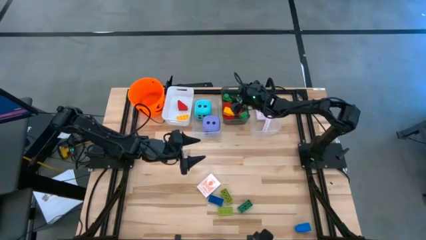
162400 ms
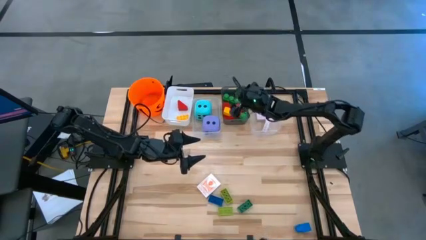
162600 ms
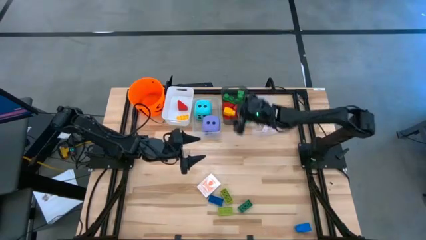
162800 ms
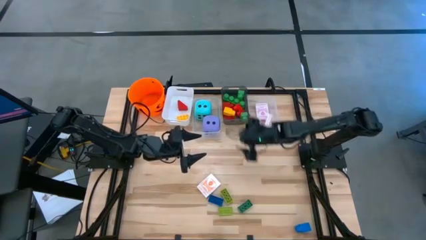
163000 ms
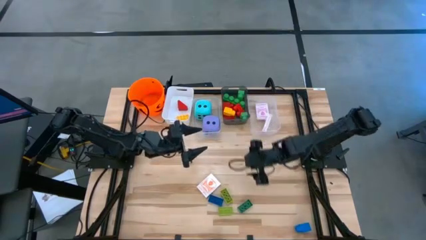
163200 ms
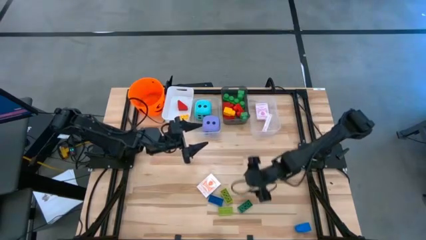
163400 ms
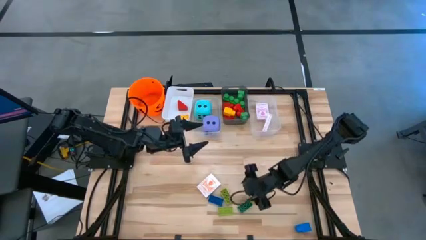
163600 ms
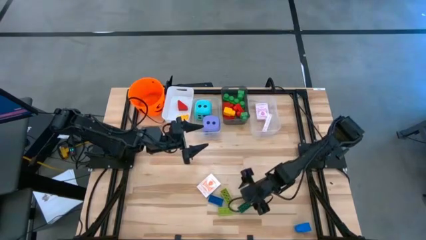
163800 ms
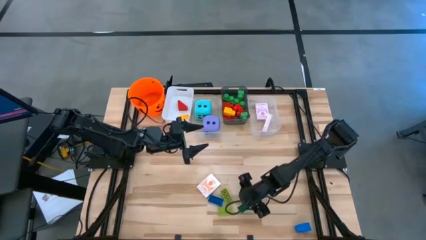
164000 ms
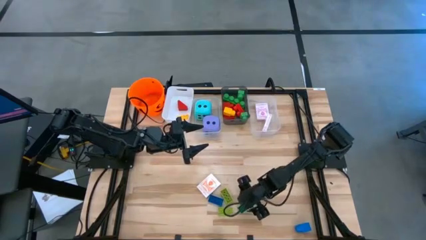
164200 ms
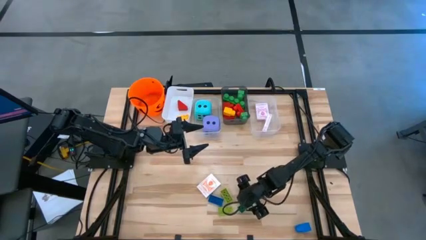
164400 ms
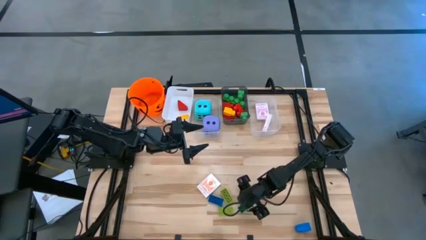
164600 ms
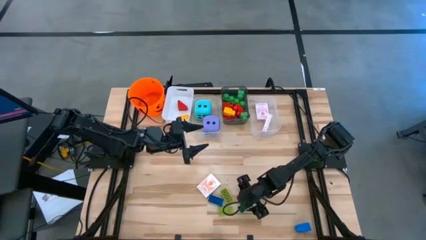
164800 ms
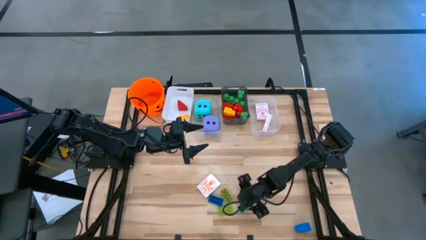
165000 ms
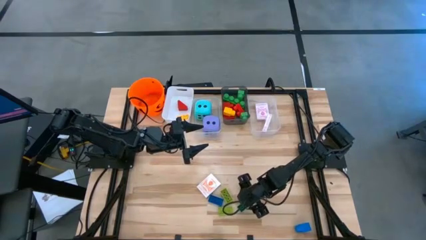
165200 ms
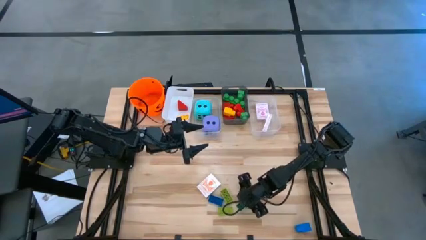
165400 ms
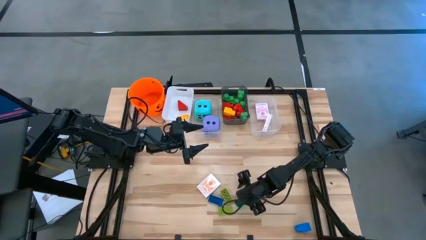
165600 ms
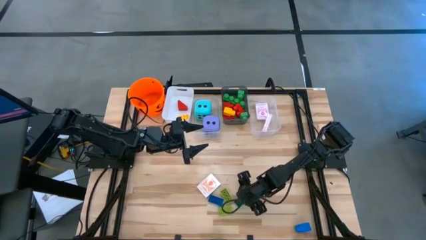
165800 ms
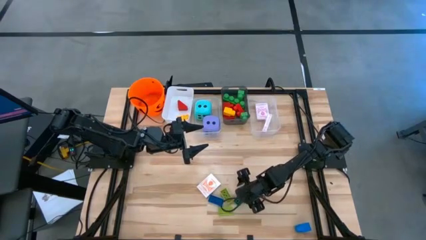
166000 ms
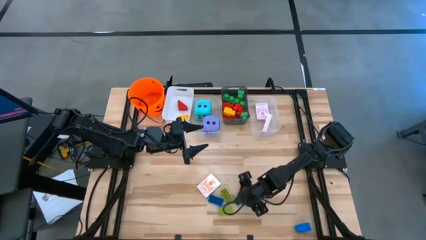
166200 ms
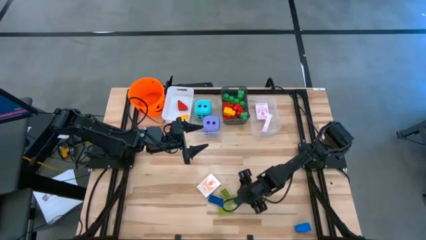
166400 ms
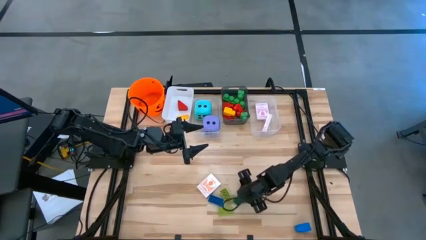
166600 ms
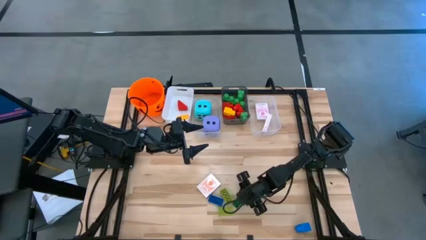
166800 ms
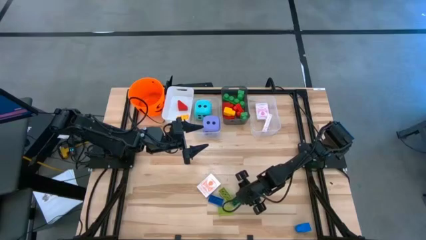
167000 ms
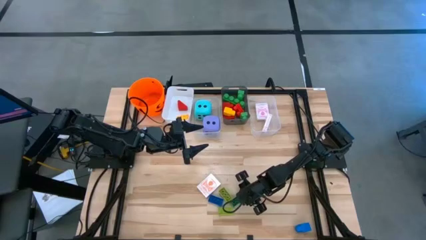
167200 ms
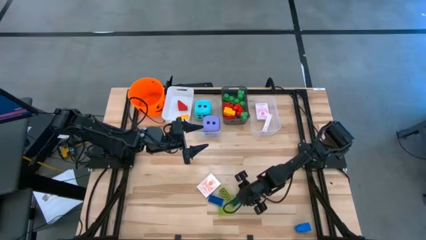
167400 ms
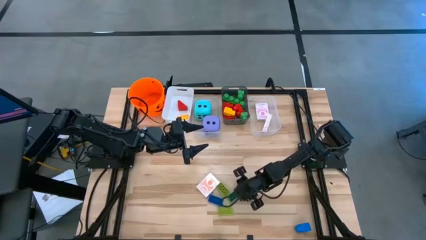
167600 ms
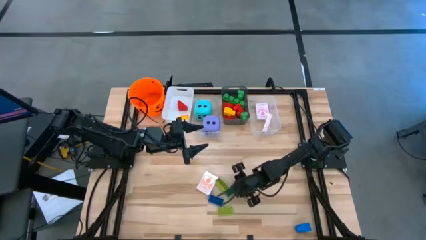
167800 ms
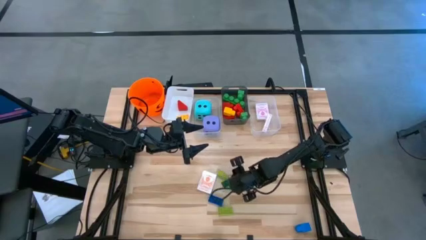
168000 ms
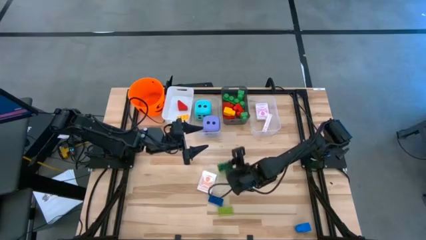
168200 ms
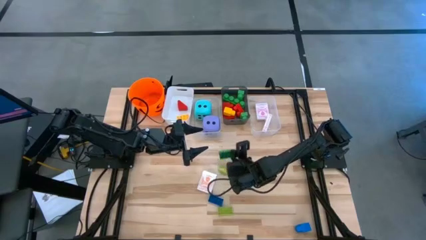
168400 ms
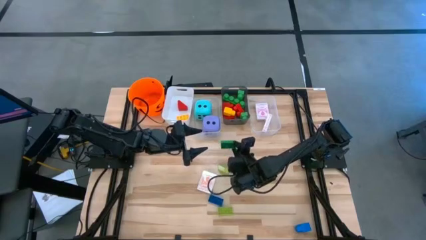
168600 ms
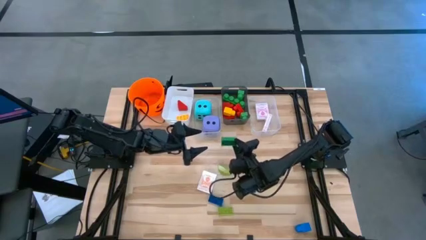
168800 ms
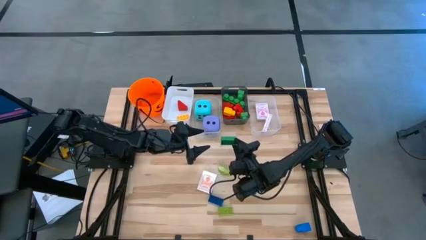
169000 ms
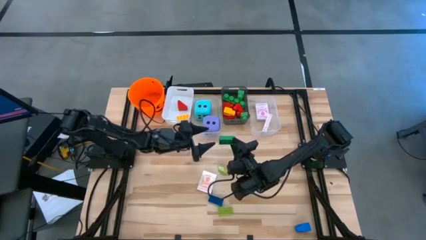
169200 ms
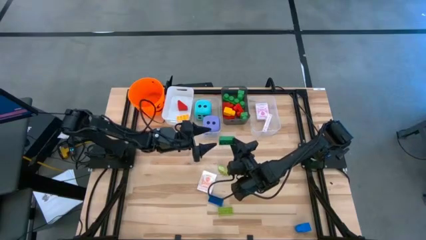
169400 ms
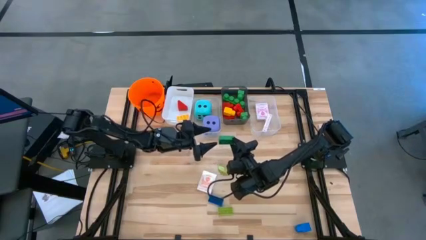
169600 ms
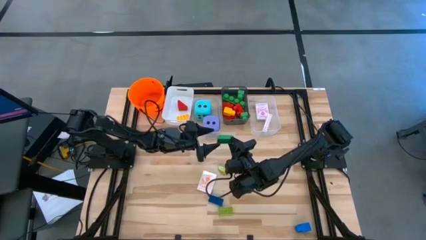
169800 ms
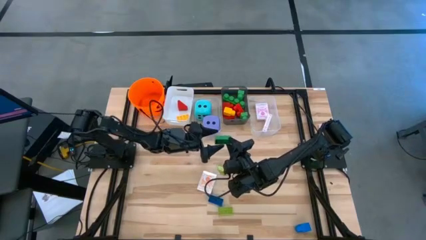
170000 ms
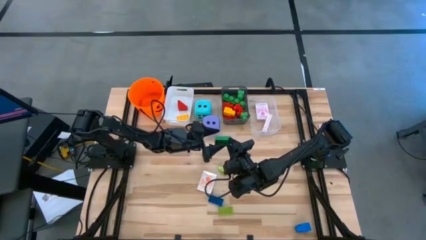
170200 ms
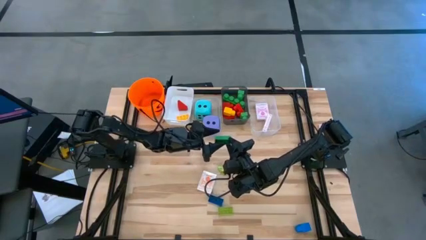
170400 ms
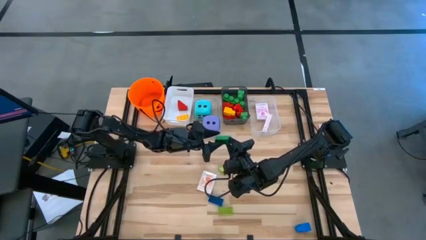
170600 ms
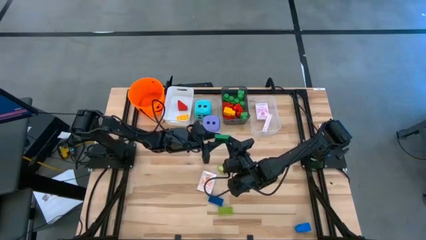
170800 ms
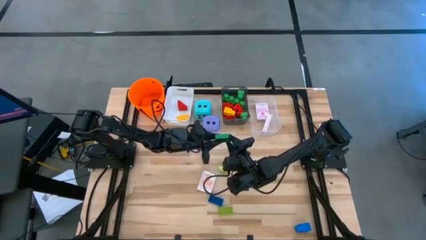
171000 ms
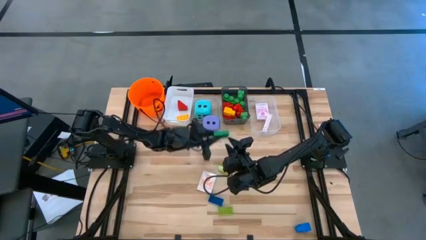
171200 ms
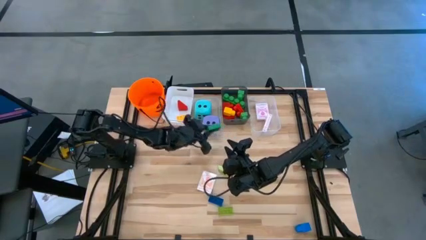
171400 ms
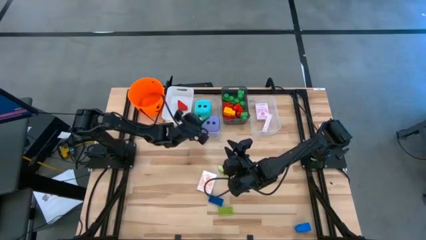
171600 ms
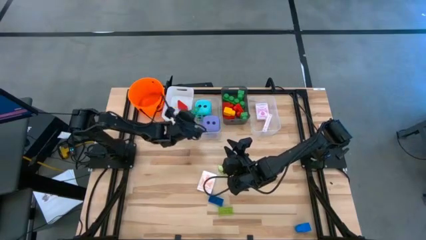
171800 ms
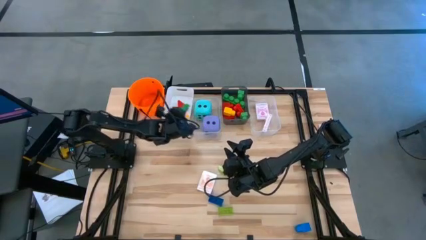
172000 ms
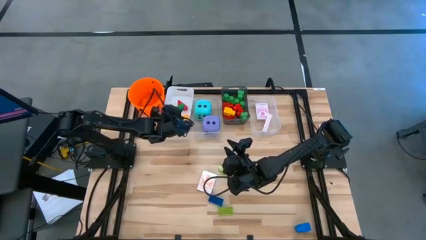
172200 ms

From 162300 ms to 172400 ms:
Task: Pick & Place Toys
Put the small green game piece into the white bin

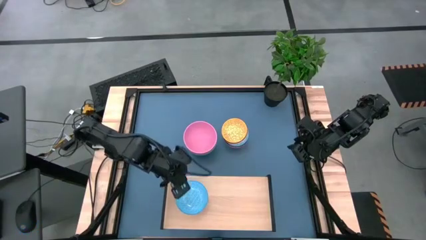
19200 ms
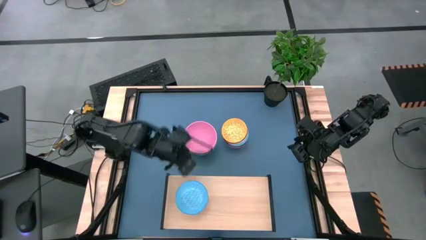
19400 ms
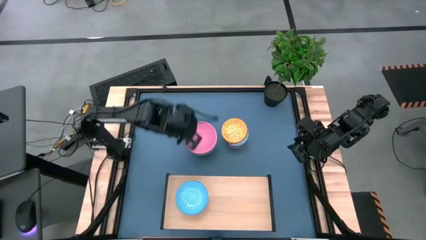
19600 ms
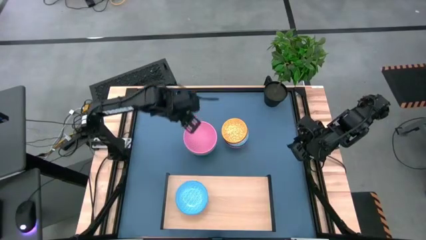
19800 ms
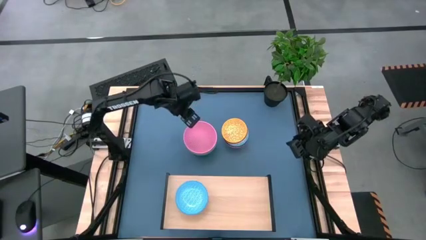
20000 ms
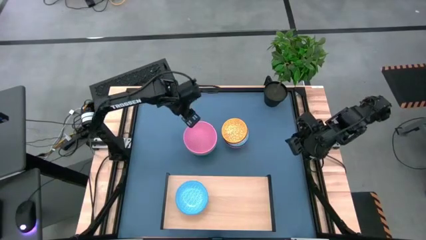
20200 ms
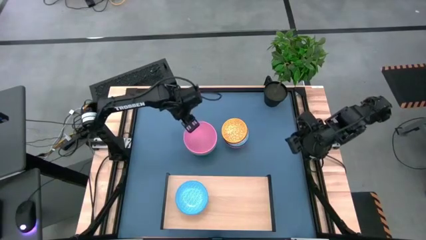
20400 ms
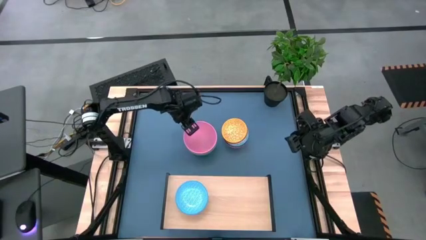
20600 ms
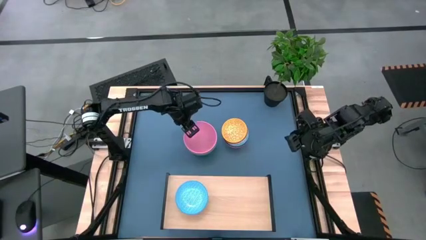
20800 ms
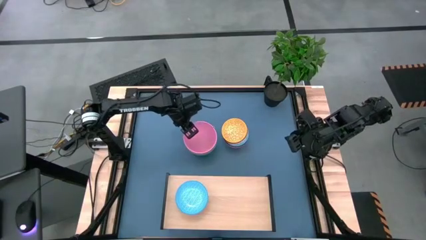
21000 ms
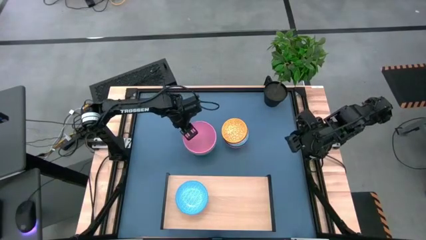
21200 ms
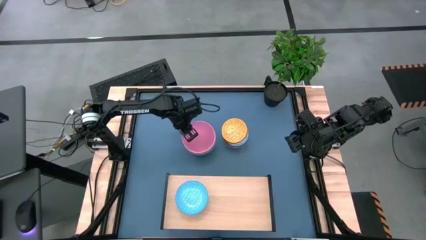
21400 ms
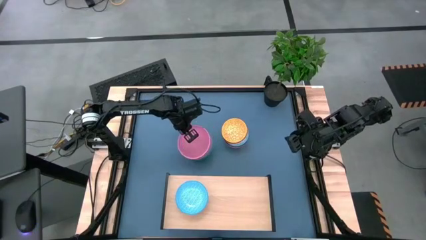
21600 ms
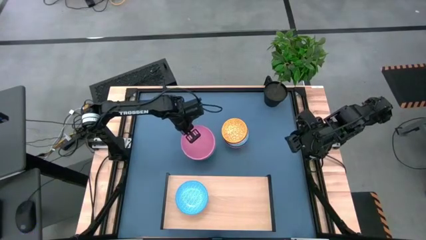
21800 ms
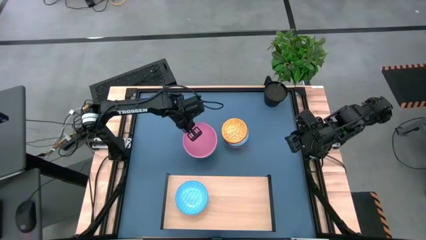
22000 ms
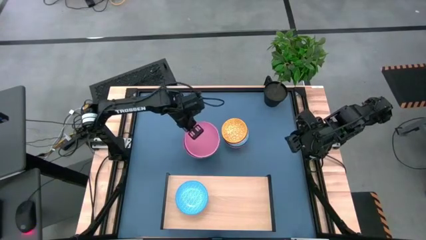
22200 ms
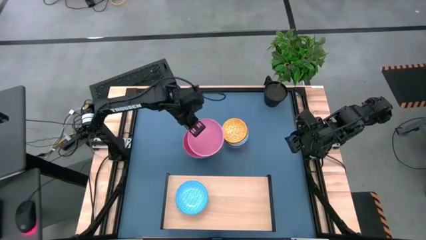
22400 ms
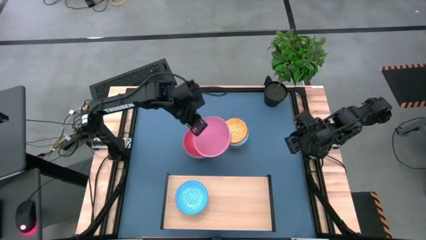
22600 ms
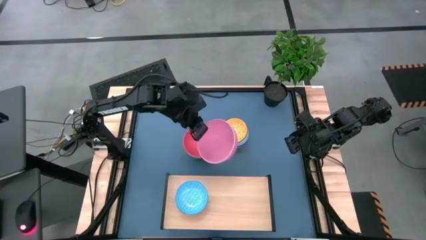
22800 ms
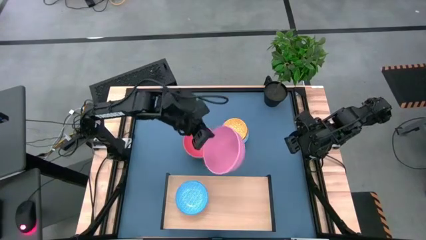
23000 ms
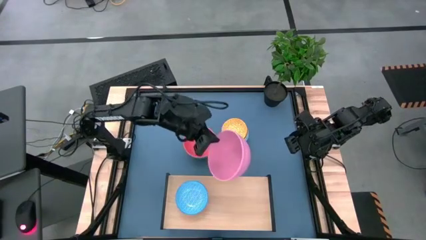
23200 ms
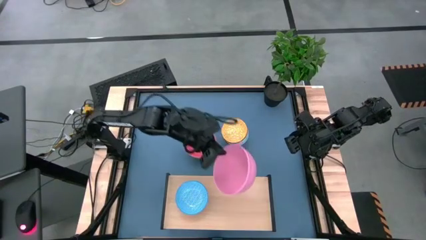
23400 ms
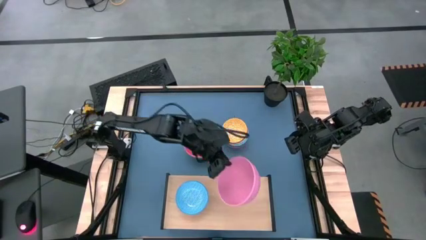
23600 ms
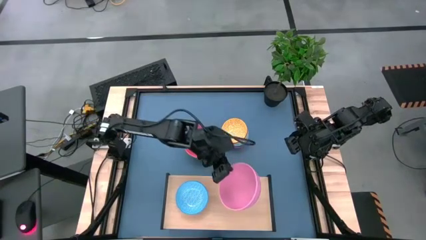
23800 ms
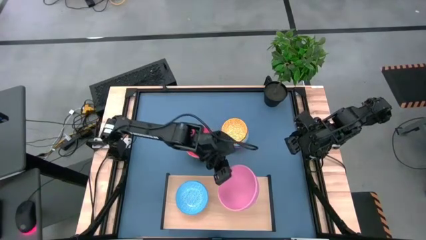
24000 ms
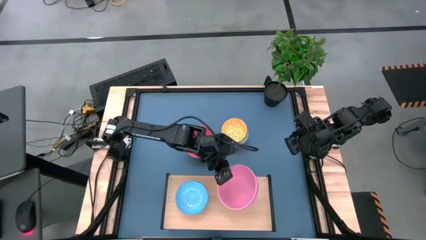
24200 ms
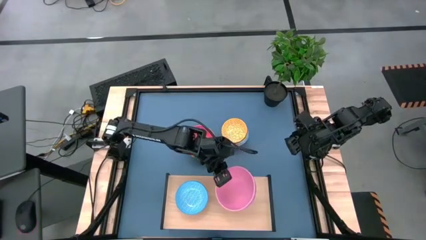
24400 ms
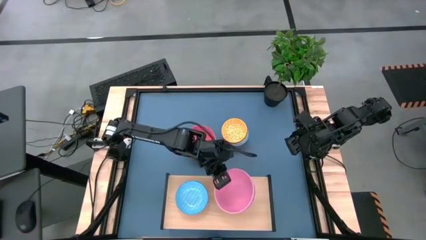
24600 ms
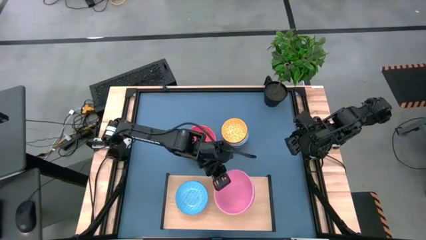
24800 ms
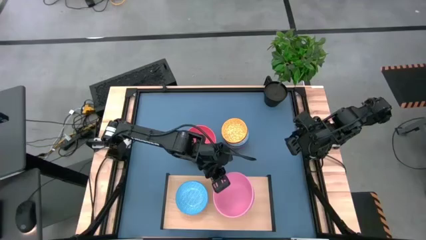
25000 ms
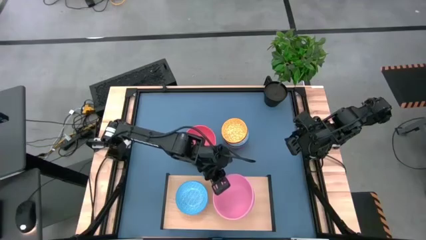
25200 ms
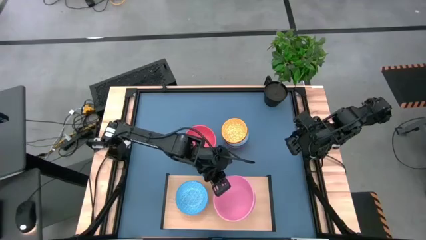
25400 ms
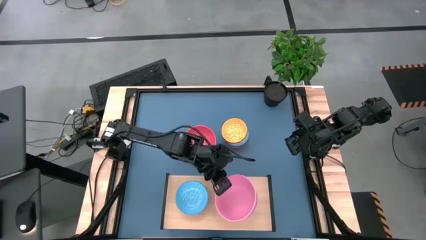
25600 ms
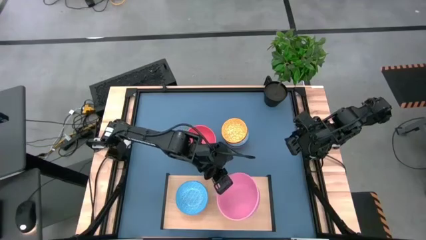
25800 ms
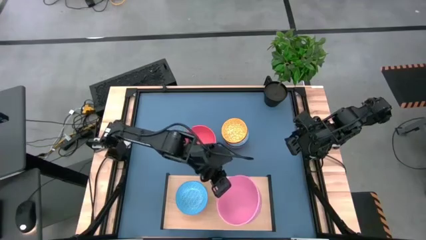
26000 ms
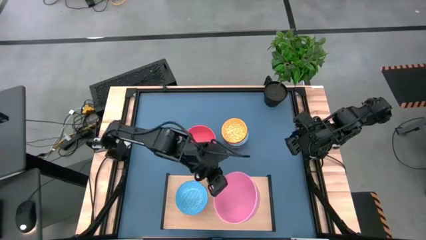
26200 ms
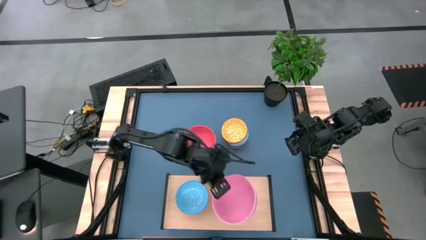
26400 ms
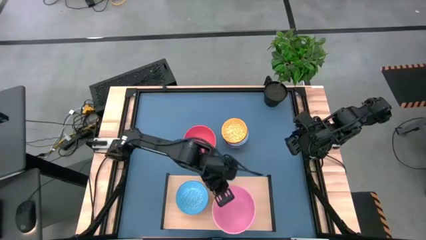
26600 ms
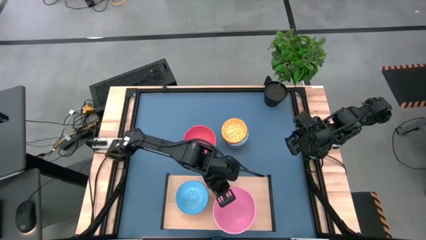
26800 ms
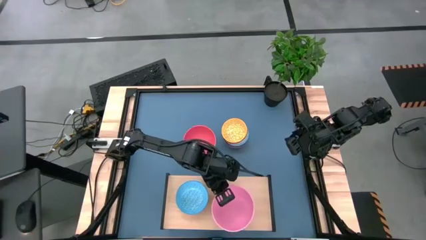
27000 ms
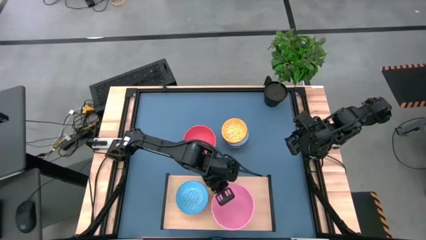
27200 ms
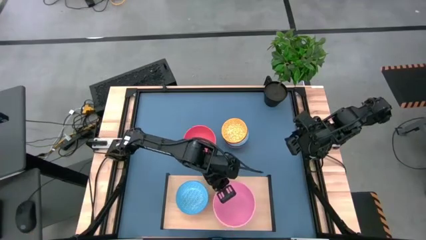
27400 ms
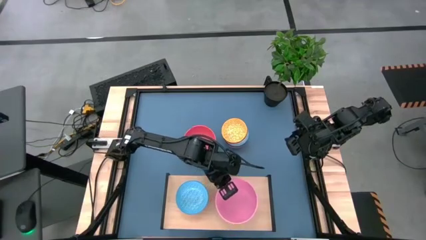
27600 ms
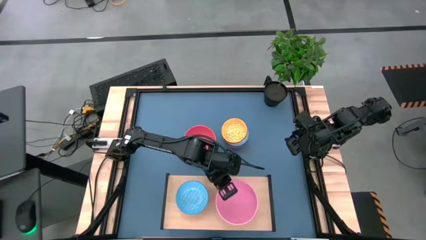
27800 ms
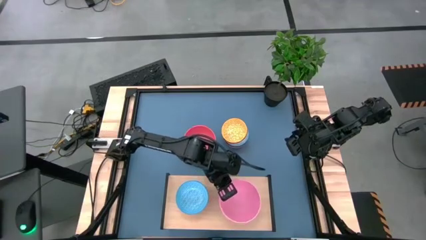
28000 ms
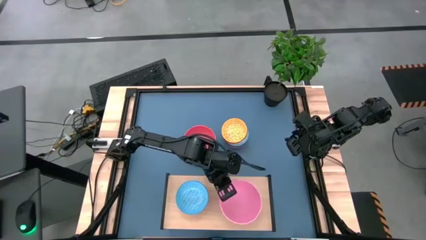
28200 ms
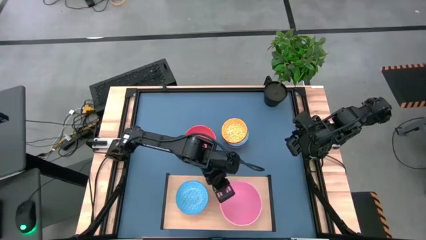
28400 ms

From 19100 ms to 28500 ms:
Task: Place and stack bowls onto a shelf
Put the pink bowl on the shelf
